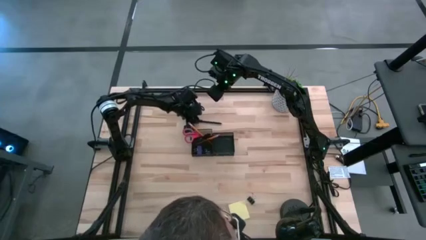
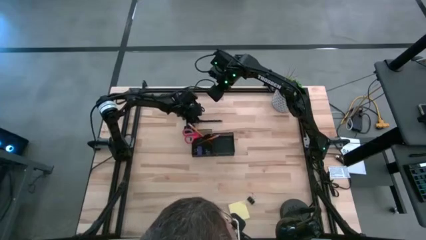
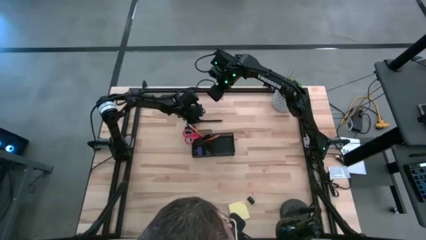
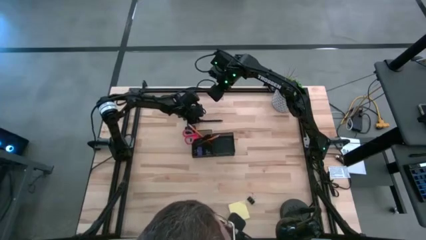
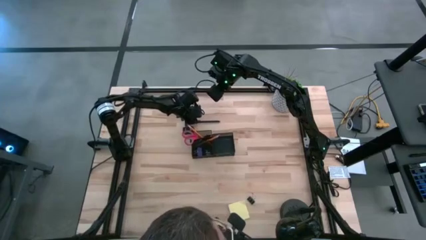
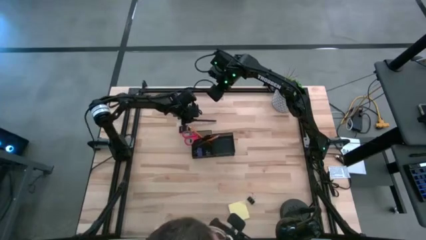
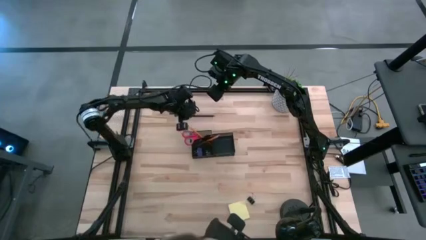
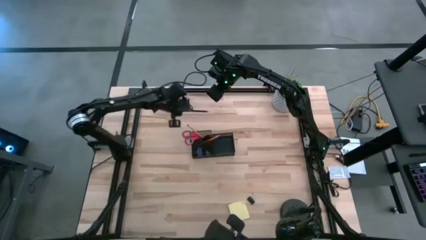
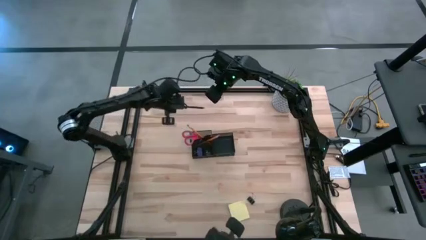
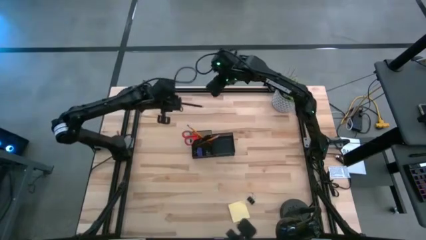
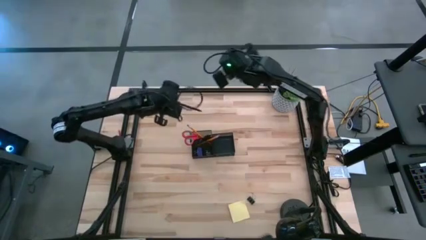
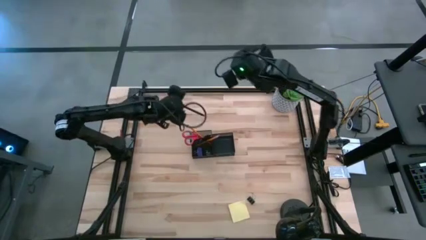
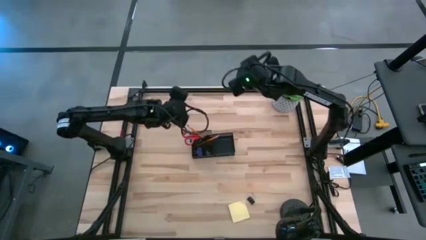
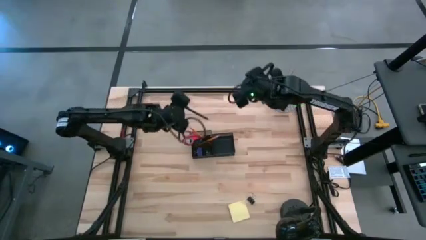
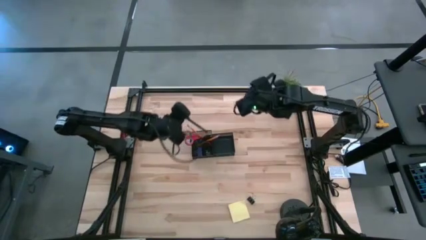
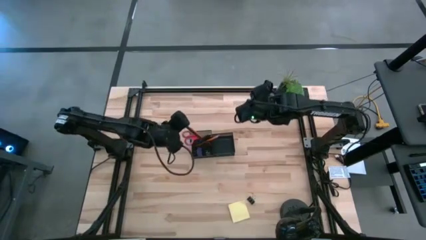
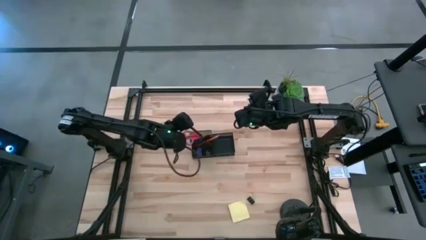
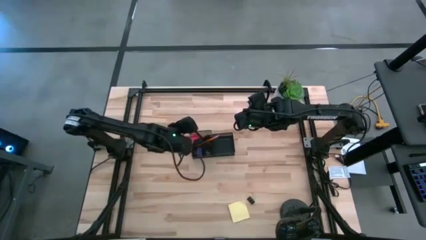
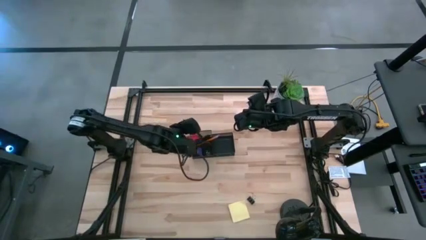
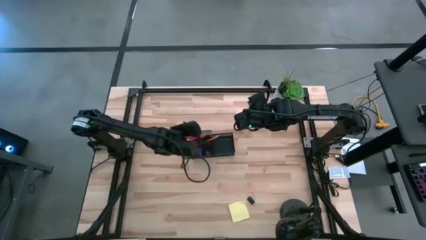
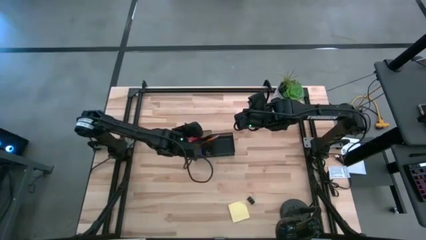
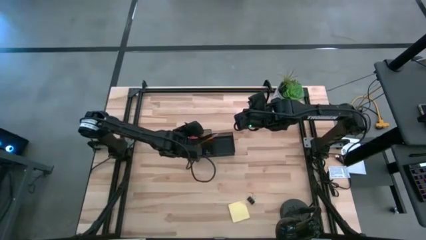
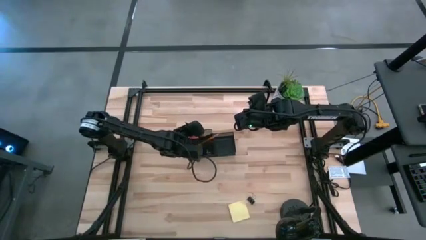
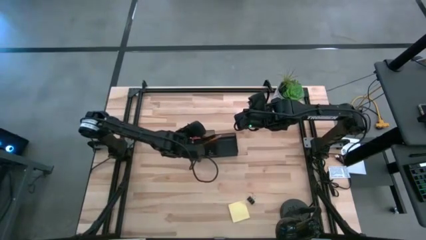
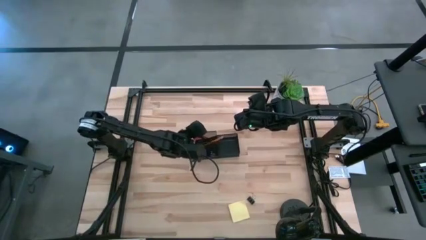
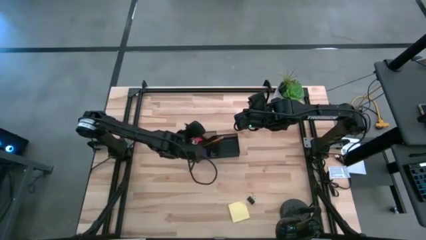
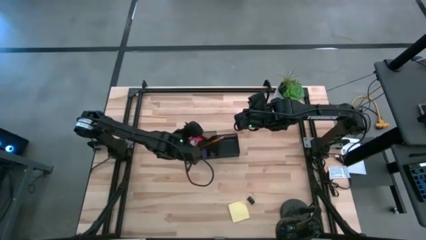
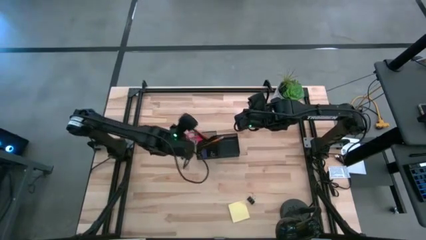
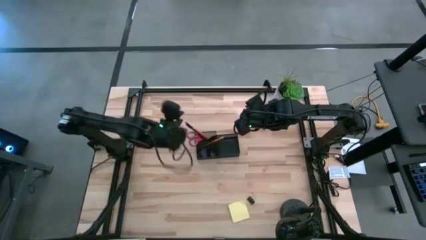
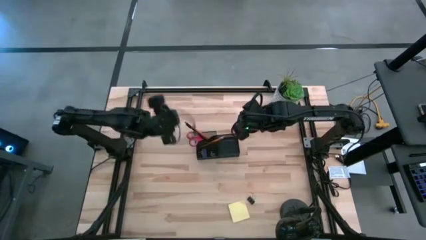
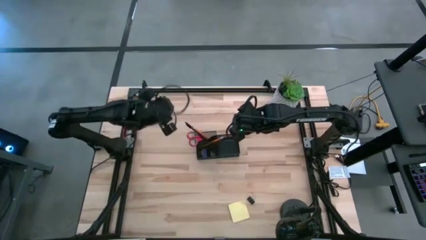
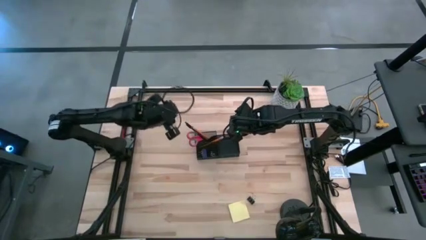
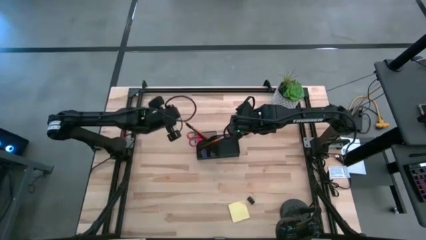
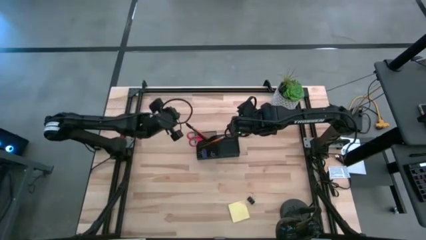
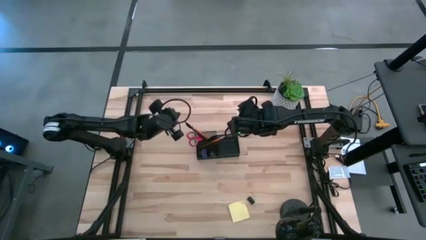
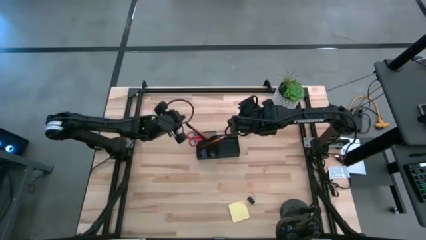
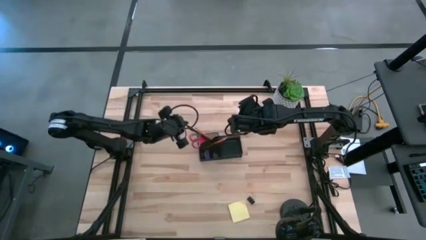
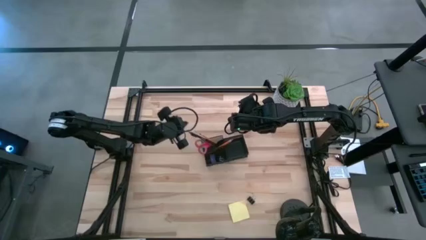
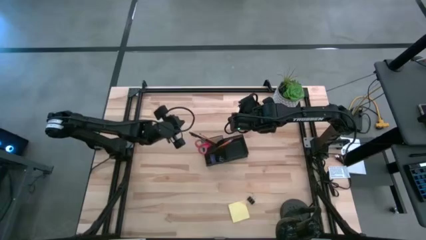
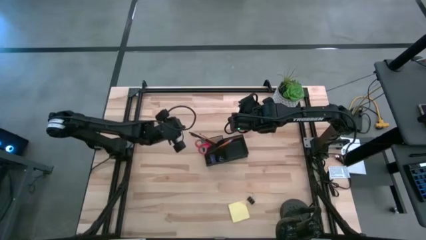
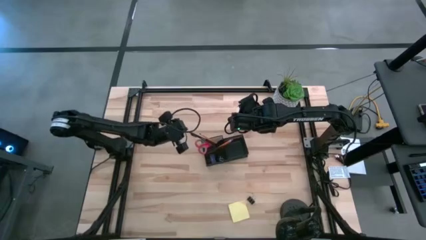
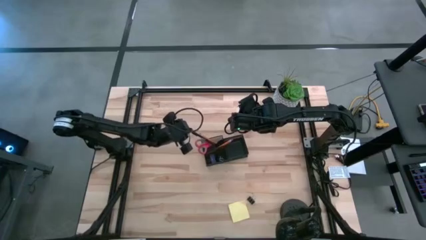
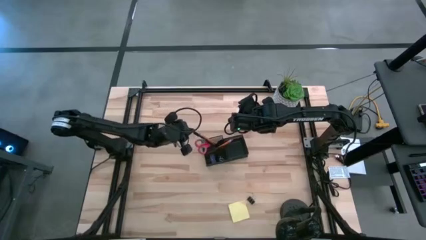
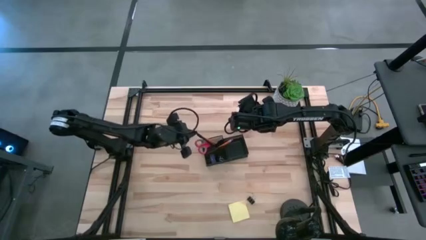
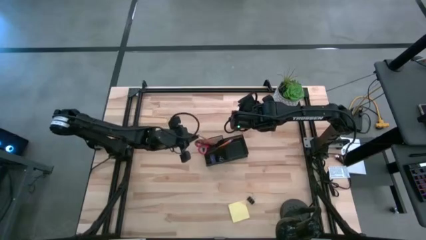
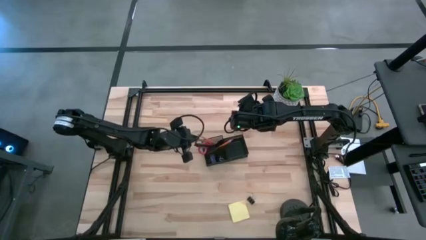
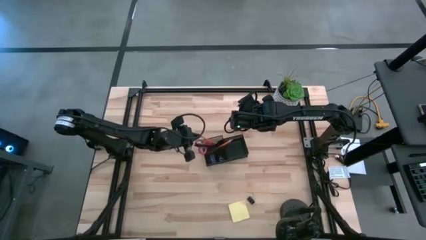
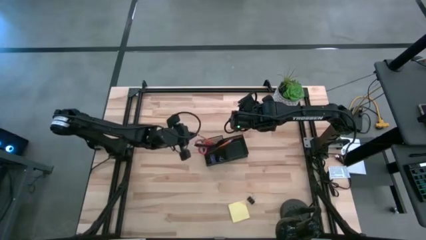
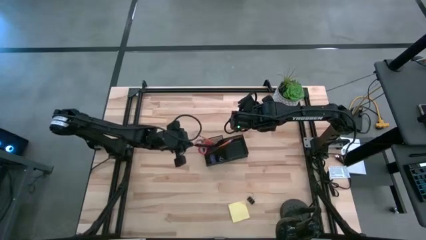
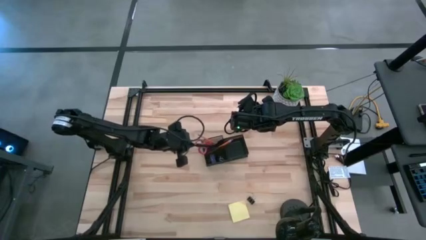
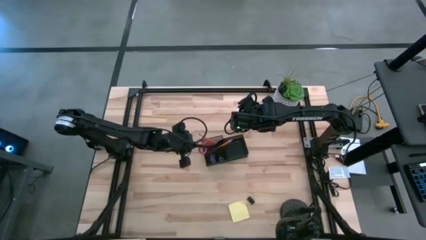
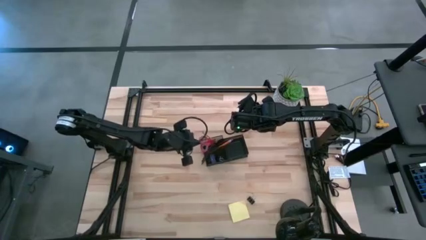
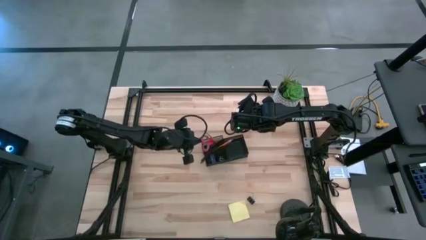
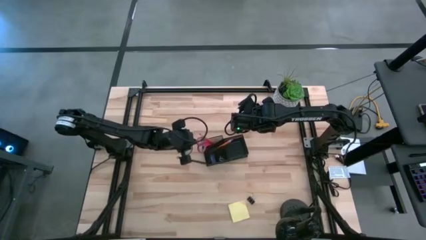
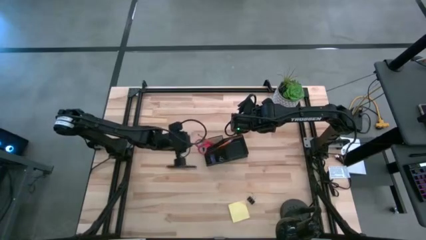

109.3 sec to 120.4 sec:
Task: Pick and place office supplies into organizer
Put the pen into the top left section of the desk organizer

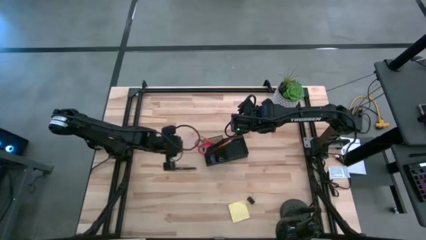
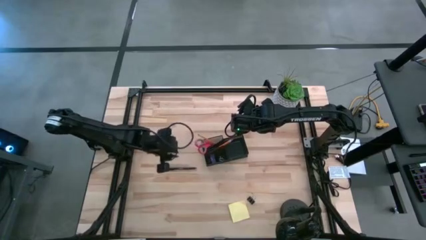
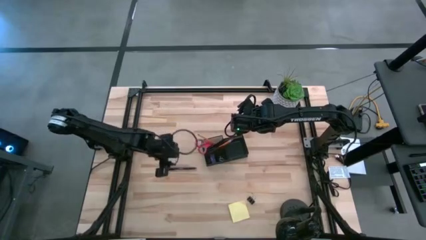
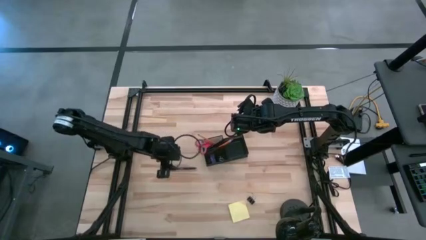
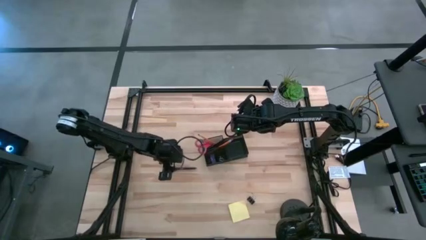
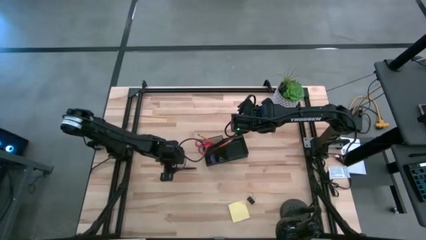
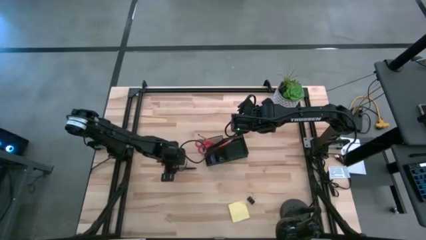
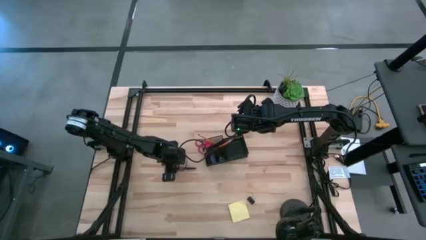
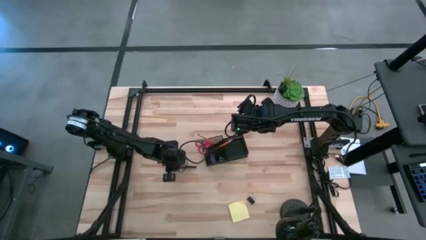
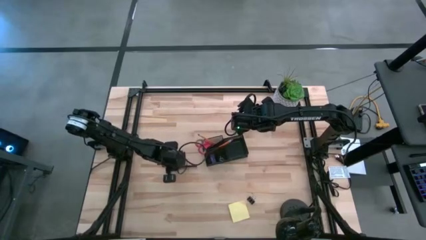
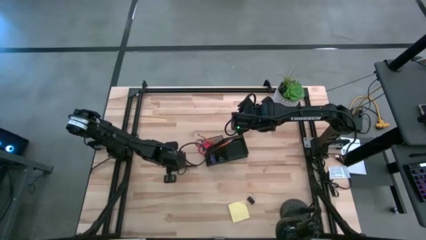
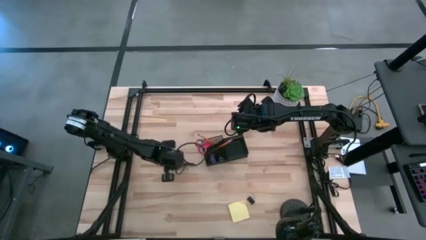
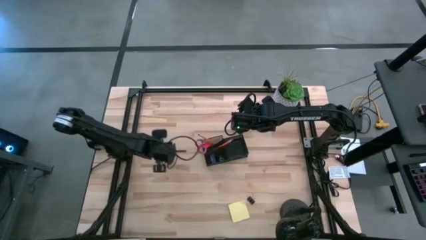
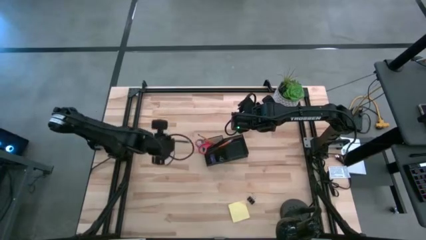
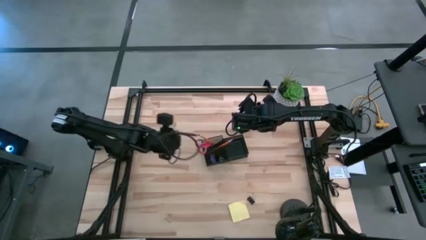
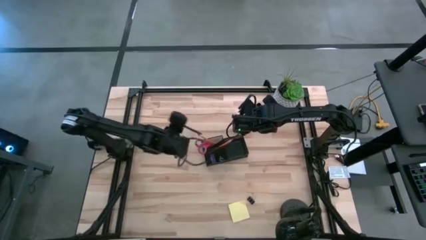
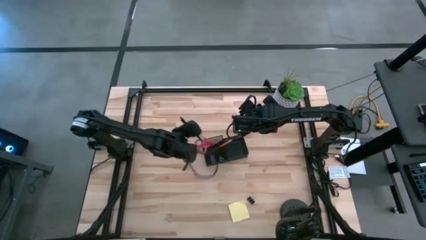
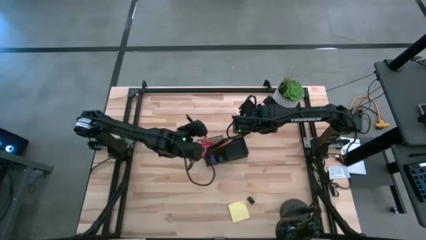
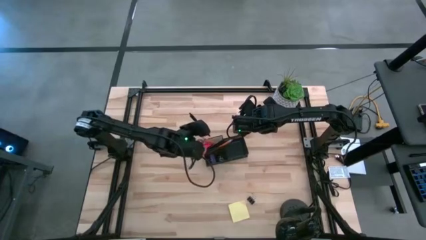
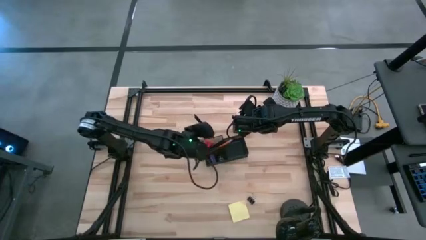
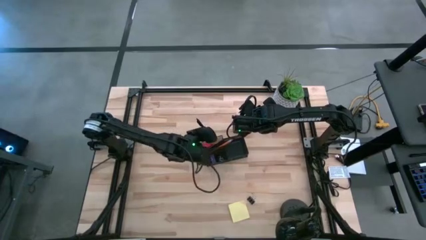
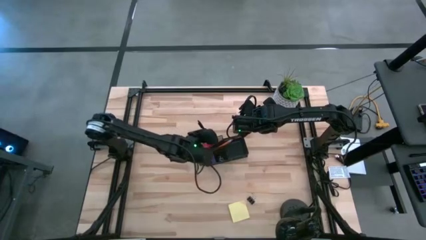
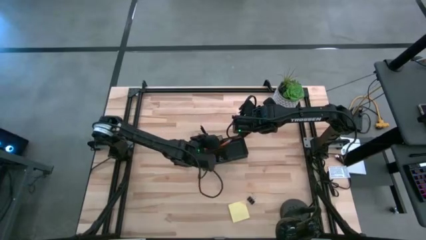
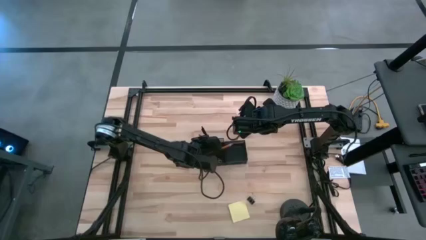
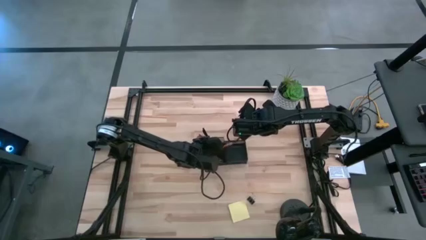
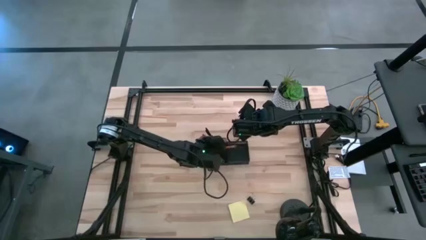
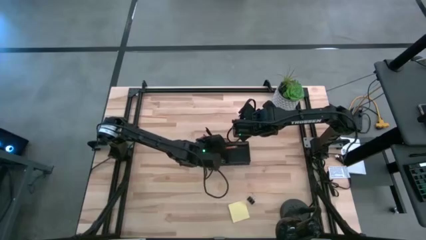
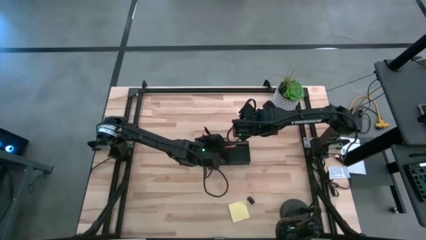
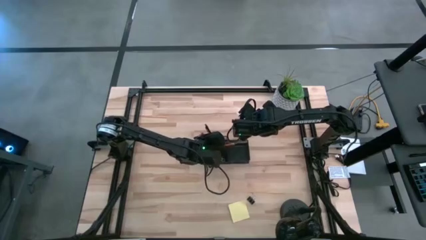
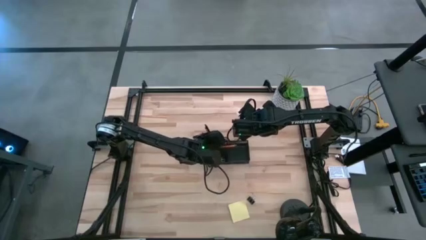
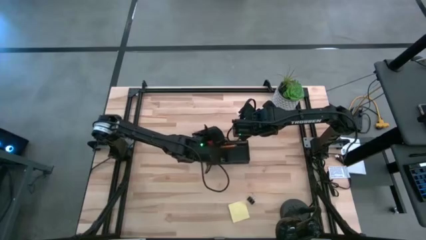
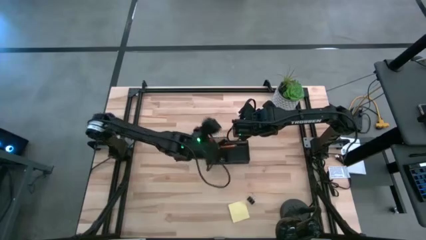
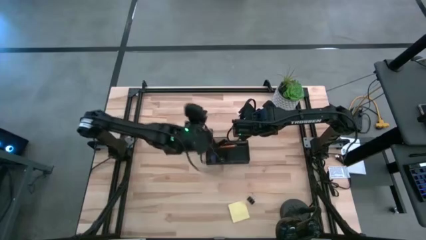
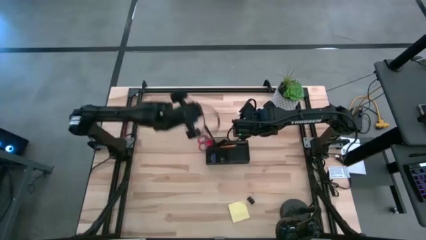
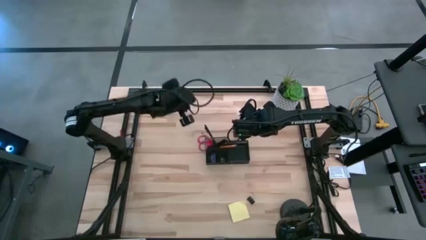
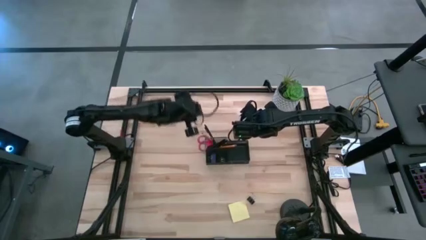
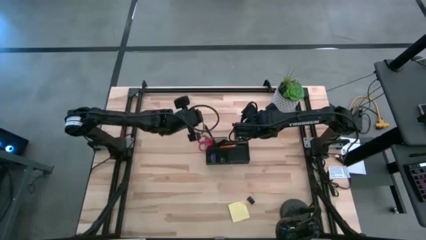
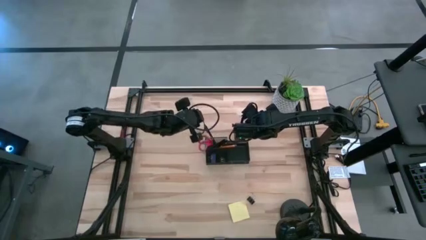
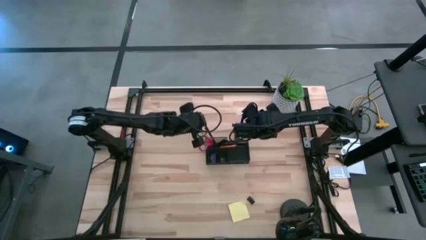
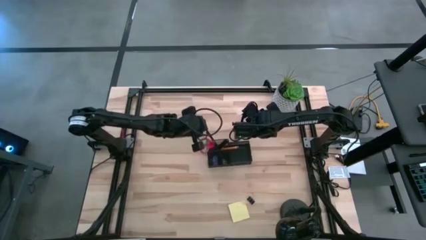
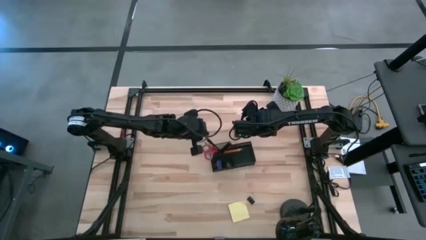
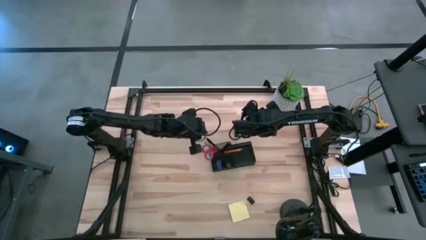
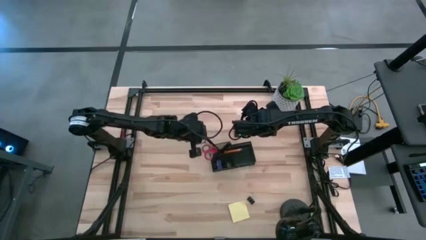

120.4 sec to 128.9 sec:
Put the pen into the top left section of the desk organizer
